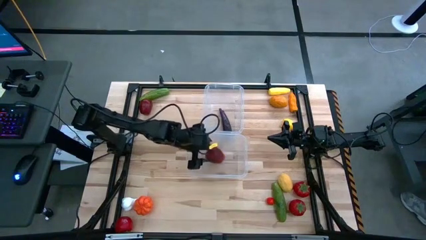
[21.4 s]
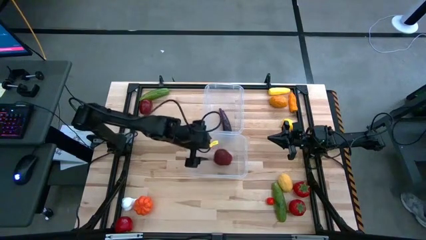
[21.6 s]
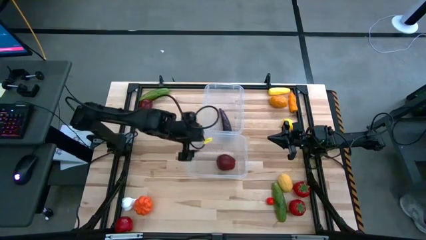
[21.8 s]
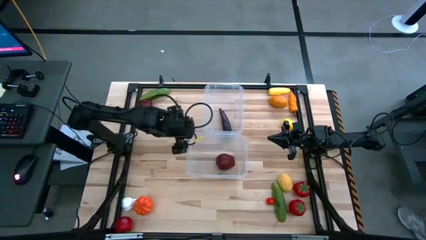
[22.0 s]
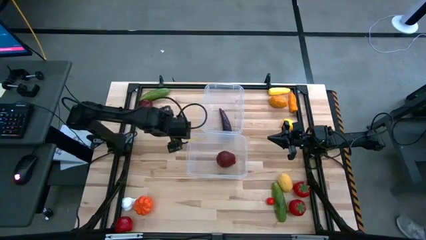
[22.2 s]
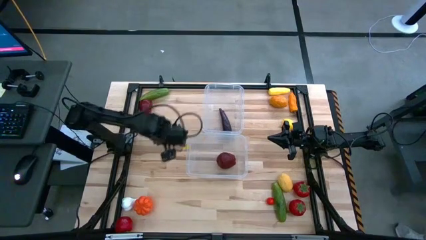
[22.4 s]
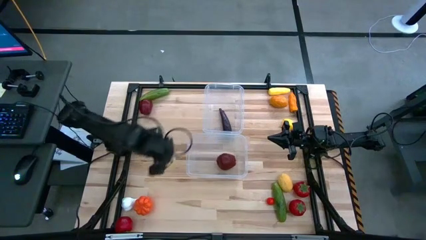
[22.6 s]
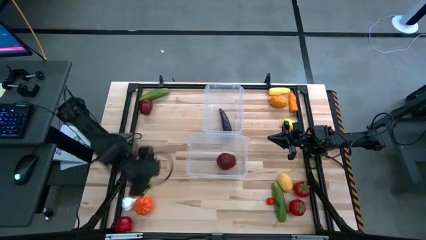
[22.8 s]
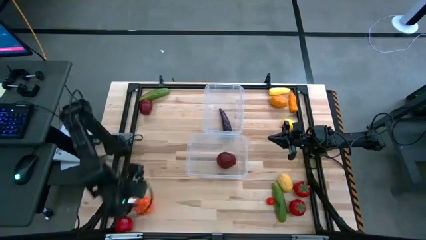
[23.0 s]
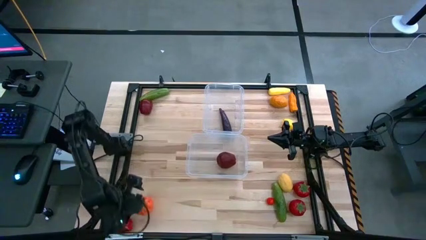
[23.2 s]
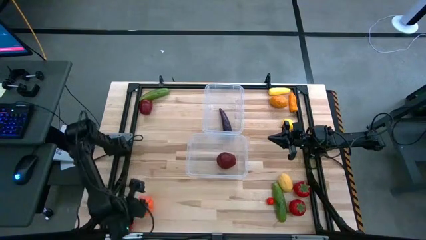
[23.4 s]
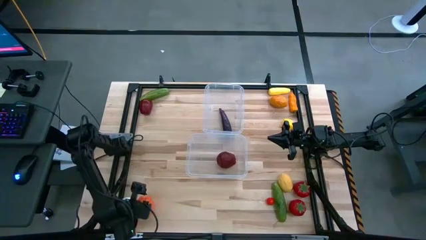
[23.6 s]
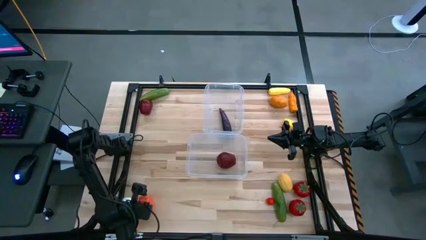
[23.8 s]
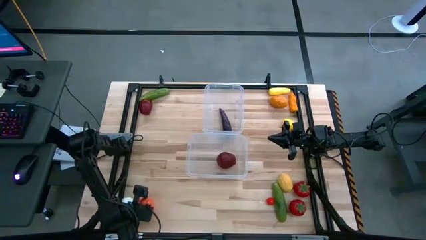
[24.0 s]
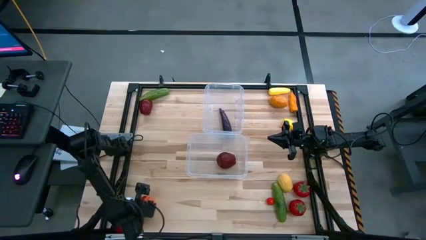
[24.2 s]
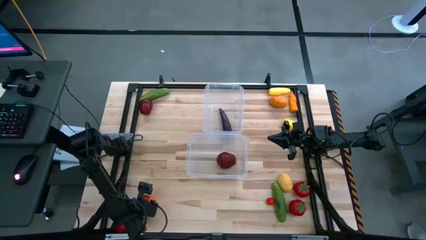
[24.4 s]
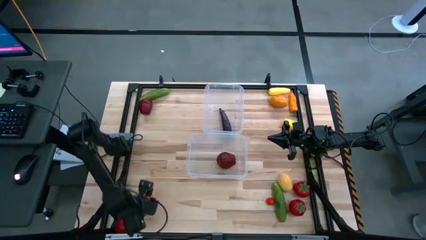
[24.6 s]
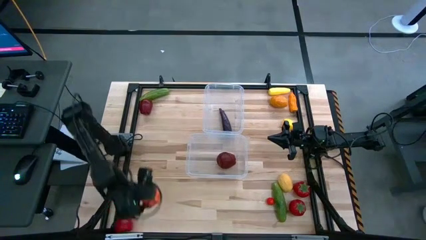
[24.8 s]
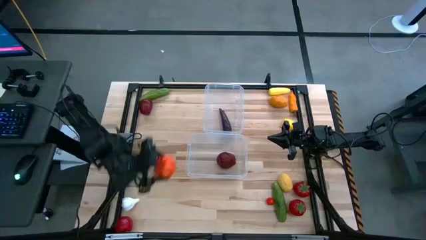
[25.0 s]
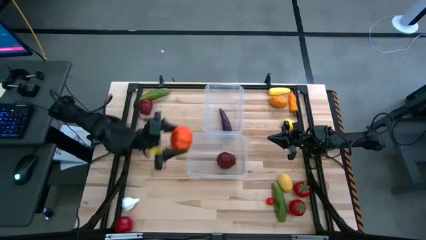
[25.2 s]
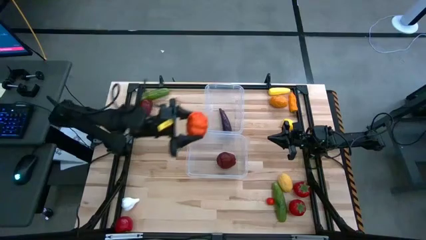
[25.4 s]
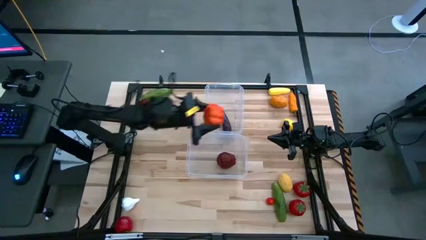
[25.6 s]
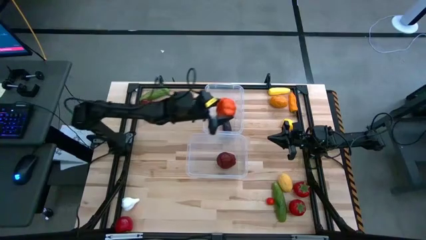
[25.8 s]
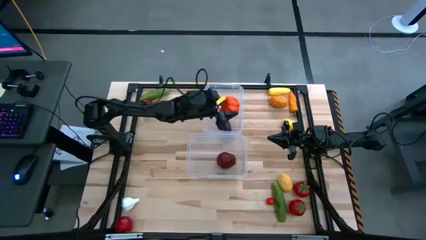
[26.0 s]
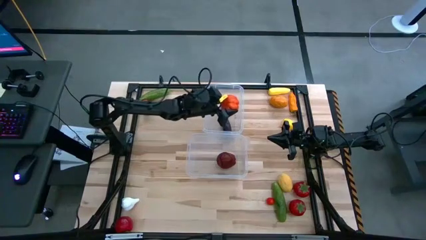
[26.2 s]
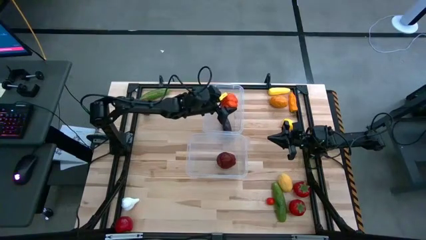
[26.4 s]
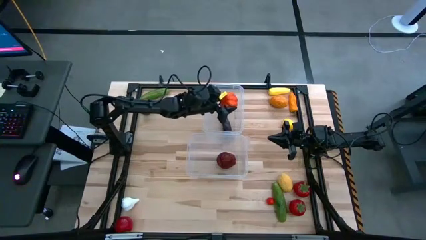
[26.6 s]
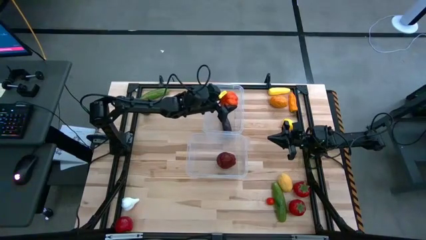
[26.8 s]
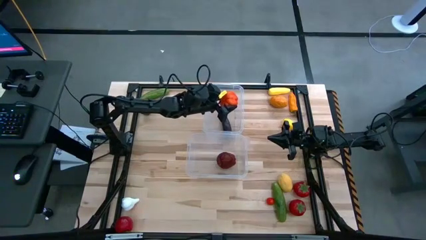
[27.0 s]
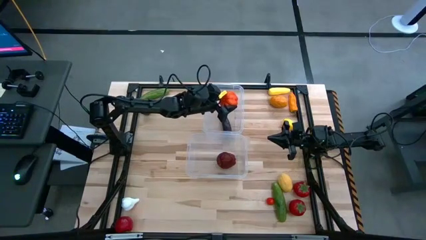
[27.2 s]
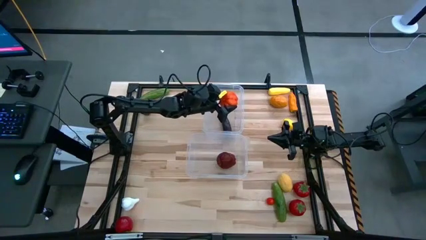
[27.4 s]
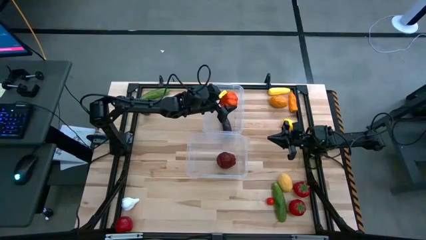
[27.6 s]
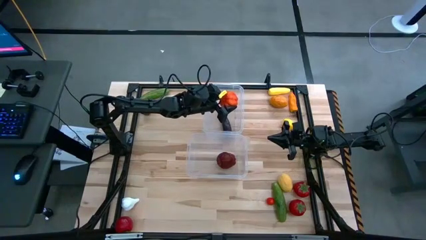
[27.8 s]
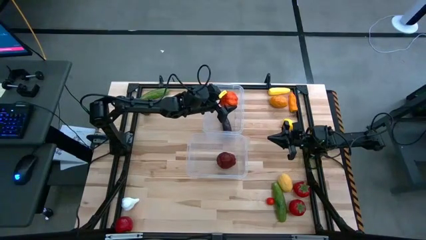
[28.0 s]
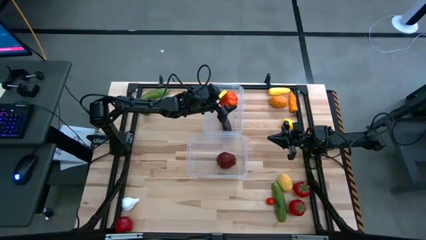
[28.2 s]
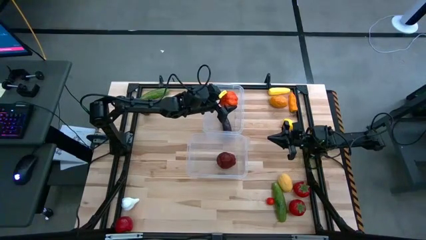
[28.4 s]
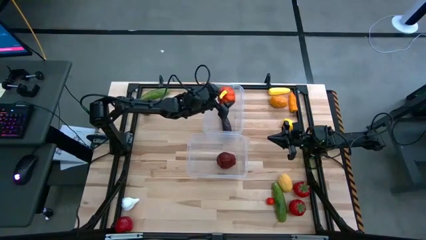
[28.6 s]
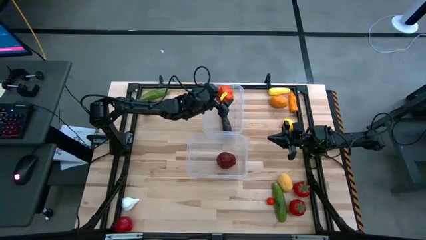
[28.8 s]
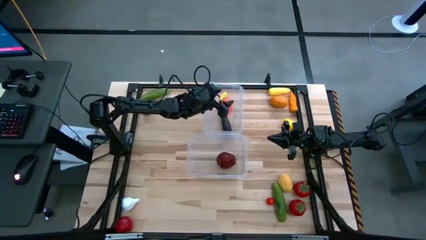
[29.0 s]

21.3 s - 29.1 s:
Task: Sort produce into baskets
Put the squash into the top transparent bin

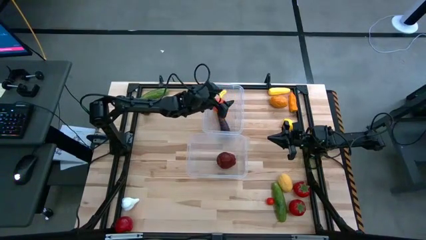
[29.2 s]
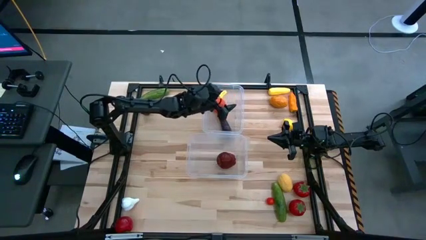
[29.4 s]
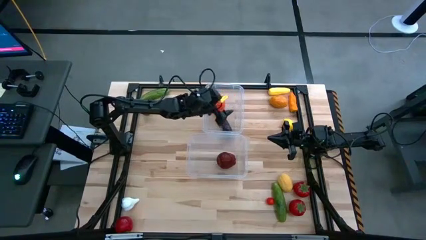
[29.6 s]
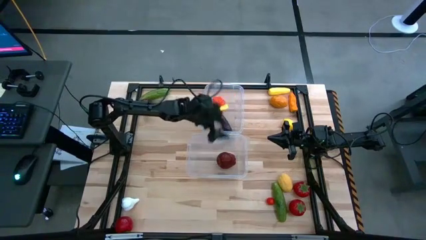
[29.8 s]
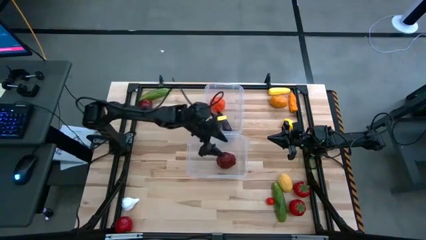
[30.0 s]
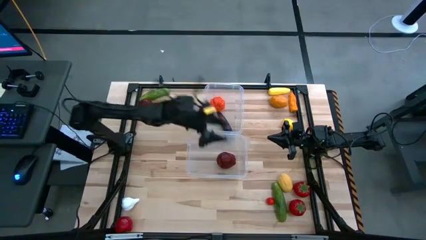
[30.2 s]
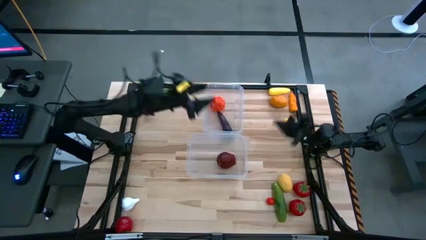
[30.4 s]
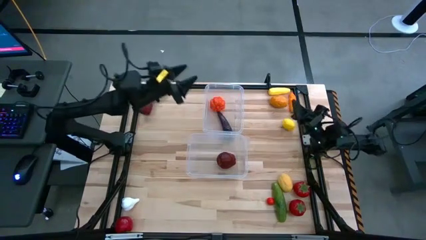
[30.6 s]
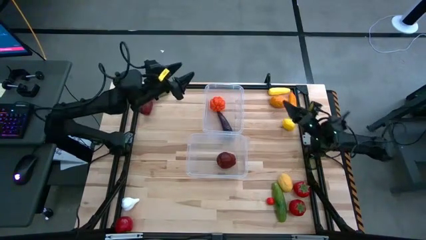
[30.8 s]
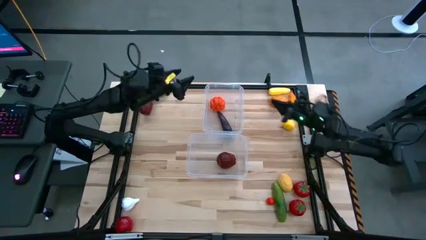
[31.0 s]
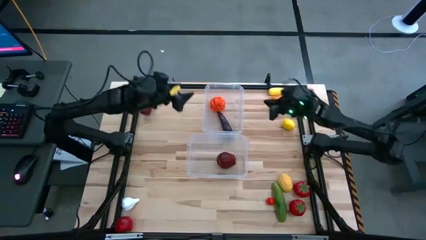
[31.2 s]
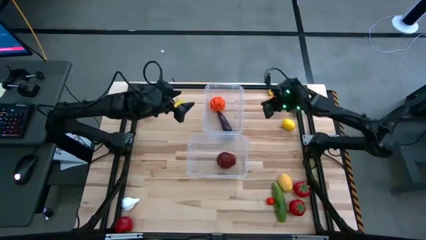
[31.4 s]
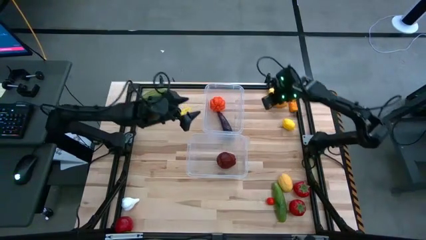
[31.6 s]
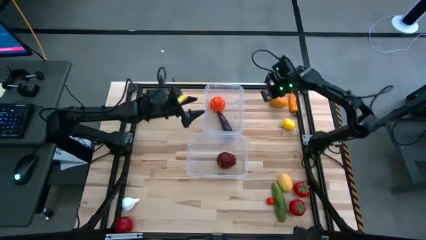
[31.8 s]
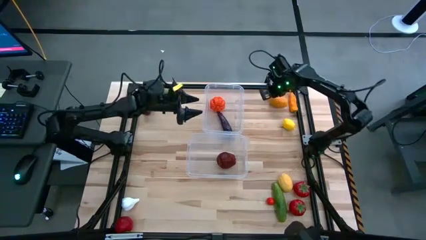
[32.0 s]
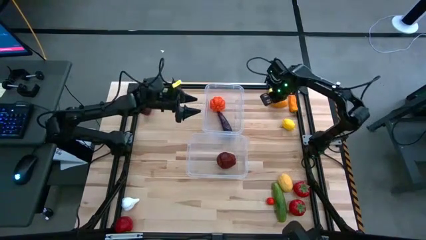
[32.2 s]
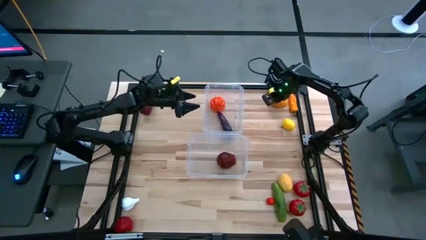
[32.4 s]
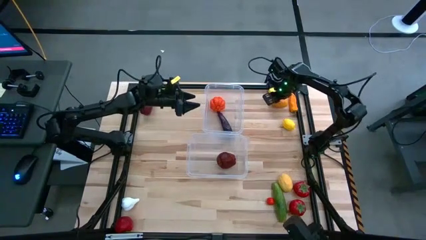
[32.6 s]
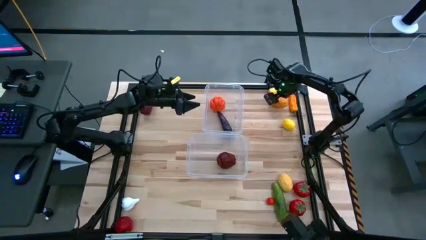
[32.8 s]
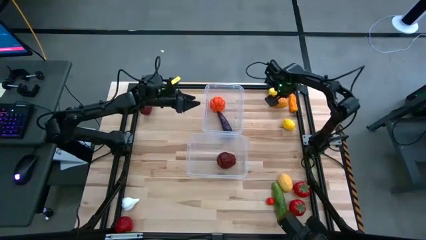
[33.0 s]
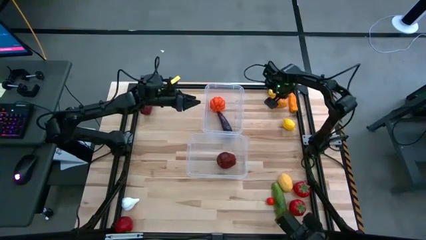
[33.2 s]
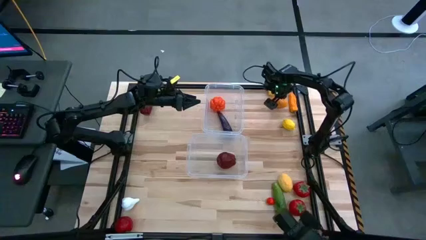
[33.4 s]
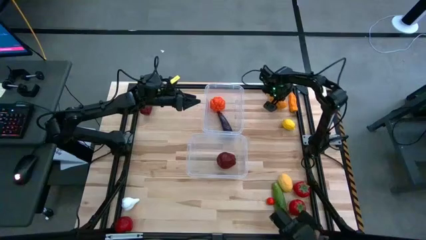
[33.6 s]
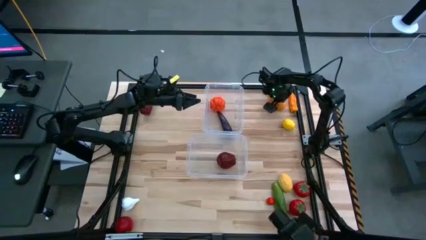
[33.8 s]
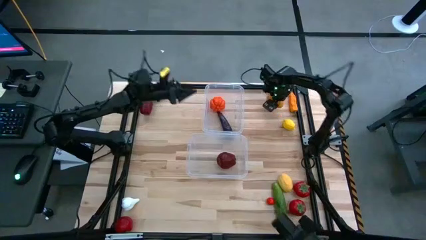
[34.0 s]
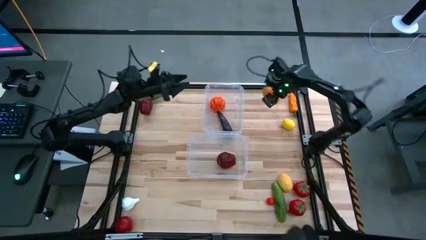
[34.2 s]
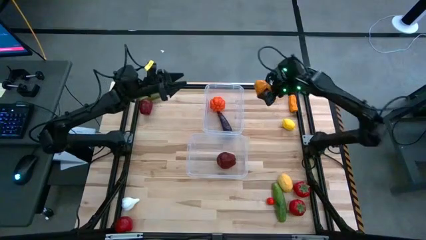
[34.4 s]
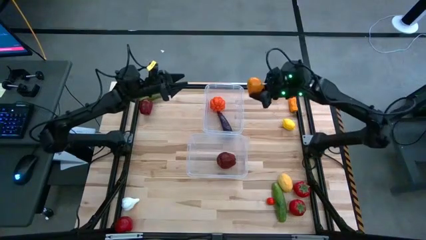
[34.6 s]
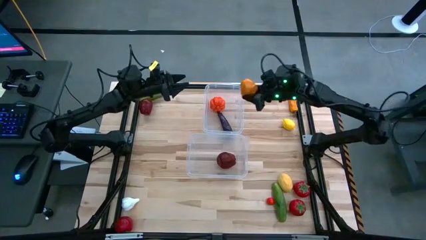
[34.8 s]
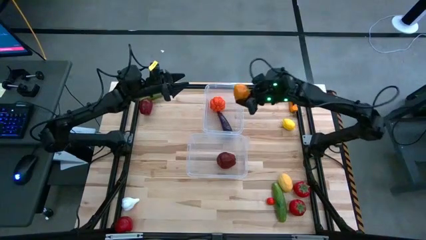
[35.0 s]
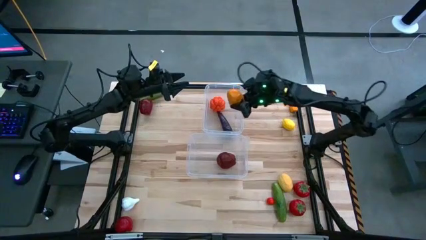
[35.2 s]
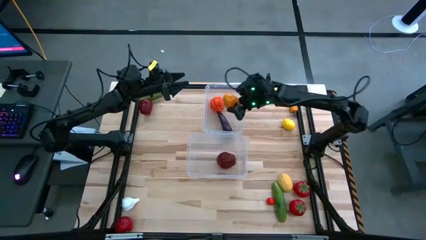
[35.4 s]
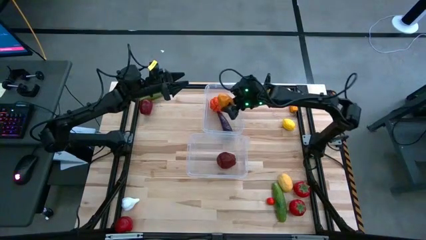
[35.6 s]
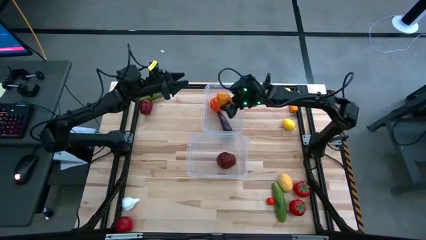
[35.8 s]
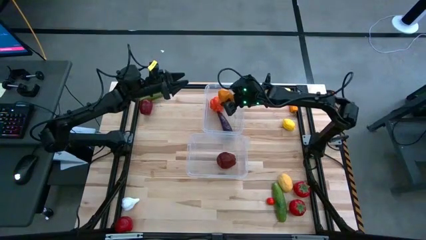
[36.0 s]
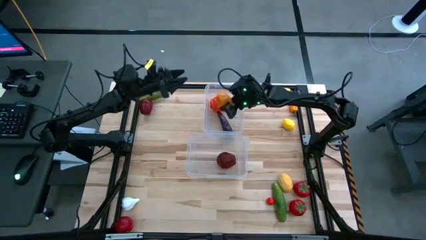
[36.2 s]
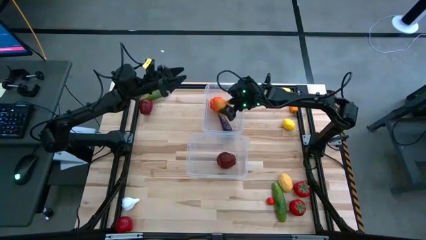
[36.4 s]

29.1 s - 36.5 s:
Put the yellow mango into the top transparent bin

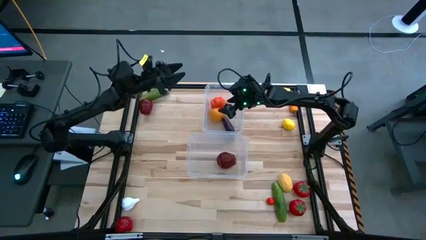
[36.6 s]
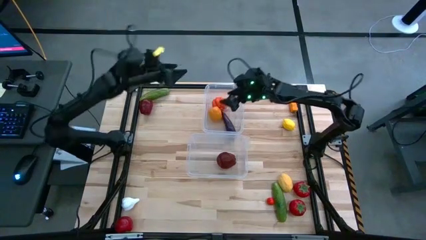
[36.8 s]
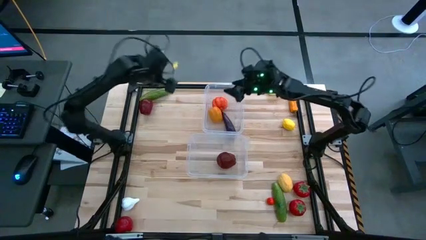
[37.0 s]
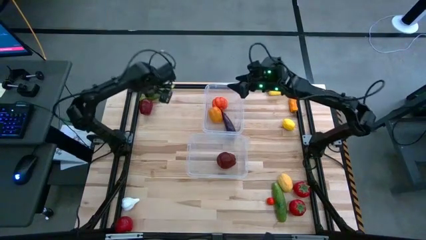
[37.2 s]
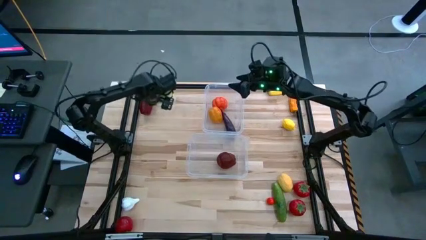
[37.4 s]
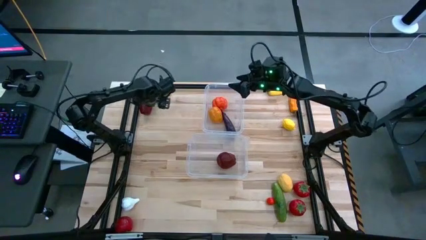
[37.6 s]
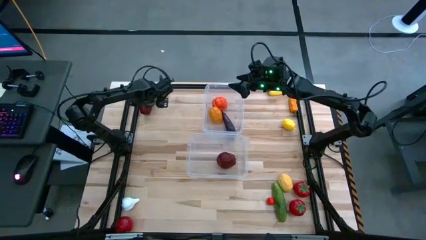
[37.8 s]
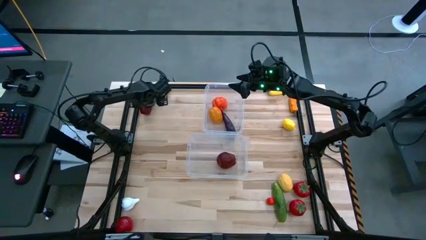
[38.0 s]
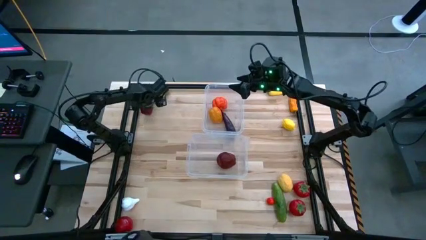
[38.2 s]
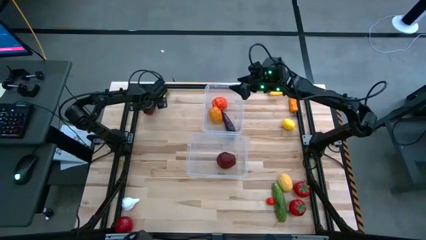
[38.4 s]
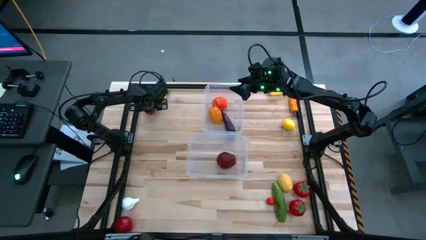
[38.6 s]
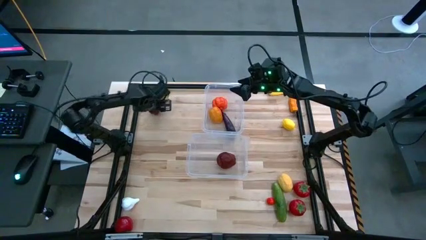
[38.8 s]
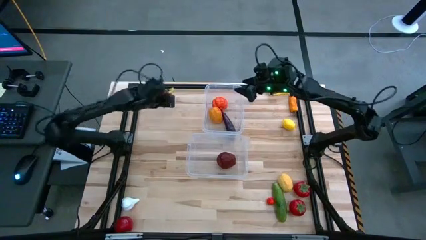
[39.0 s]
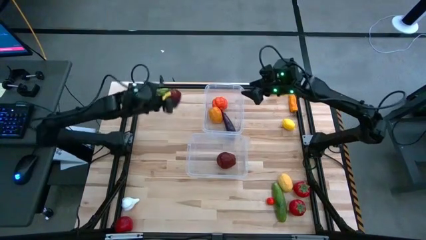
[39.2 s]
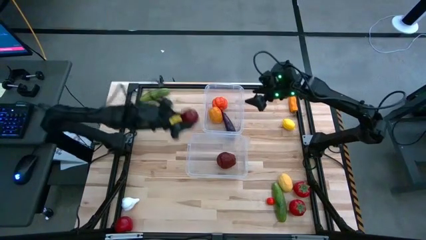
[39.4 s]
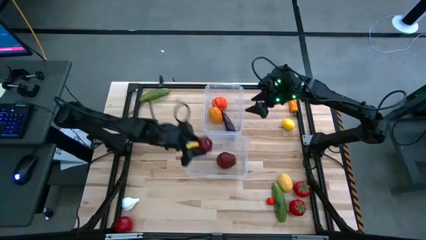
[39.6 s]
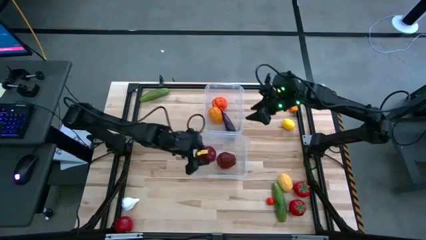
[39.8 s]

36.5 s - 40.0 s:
Put the red apple into the bottom transparent bin
